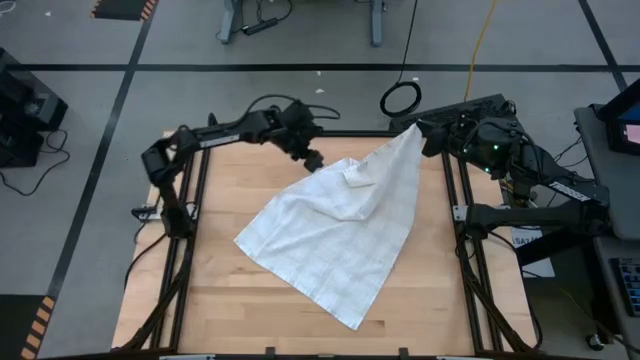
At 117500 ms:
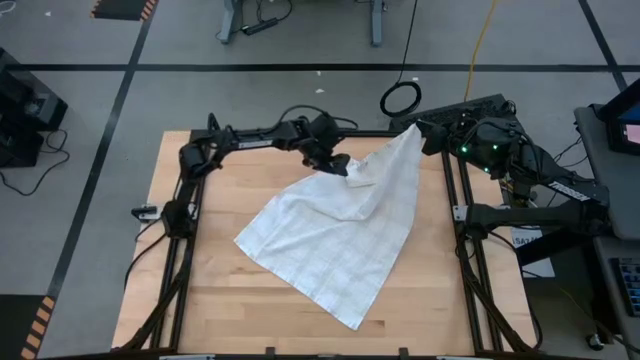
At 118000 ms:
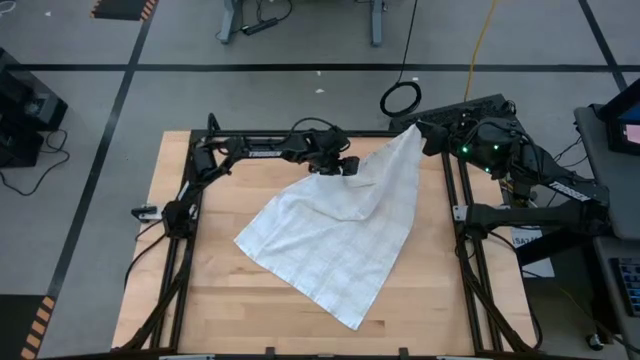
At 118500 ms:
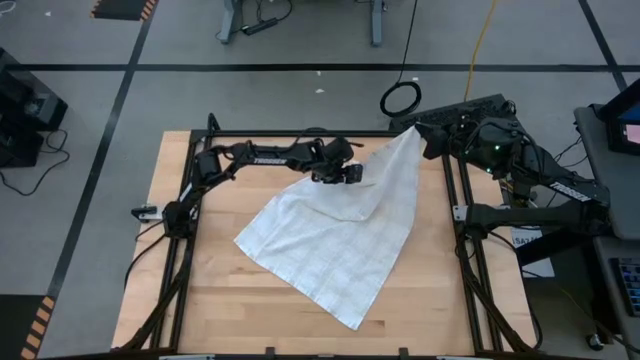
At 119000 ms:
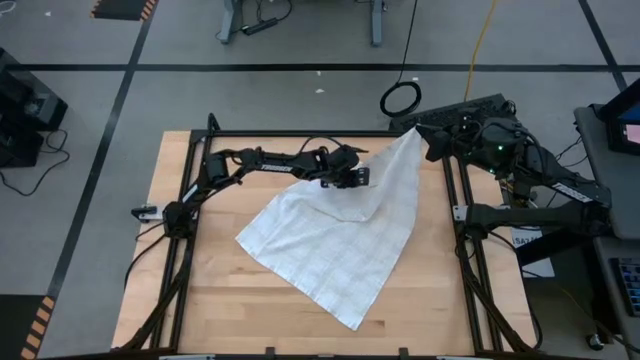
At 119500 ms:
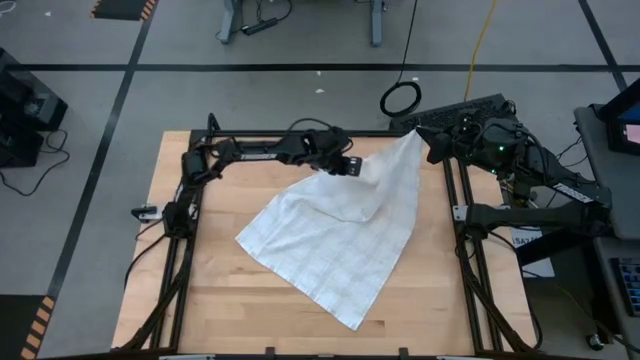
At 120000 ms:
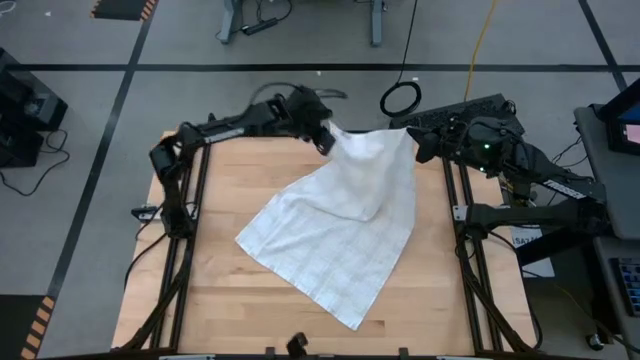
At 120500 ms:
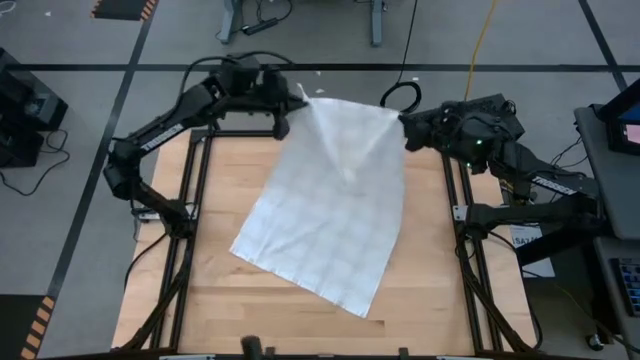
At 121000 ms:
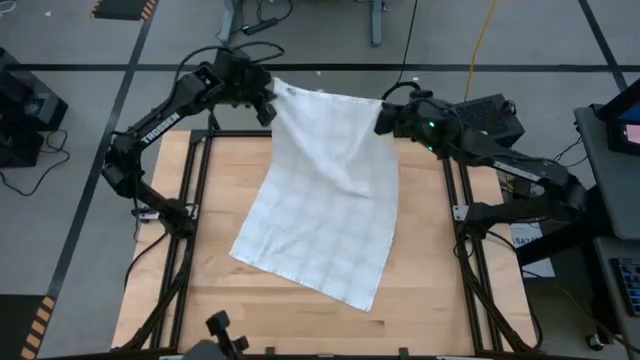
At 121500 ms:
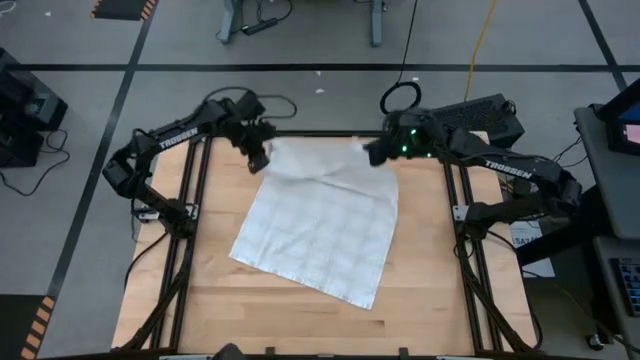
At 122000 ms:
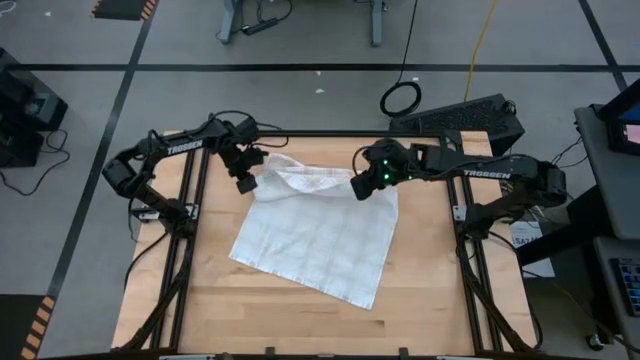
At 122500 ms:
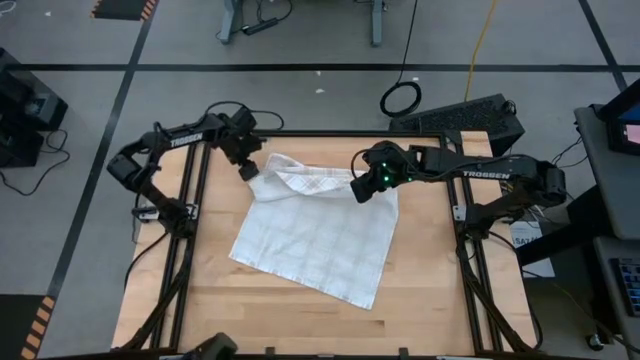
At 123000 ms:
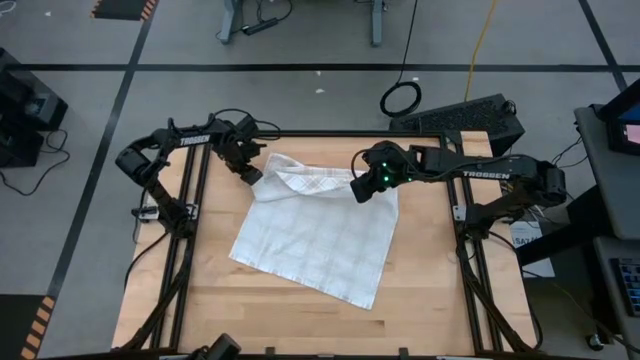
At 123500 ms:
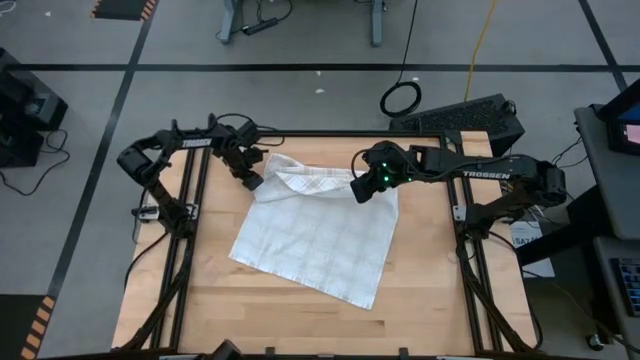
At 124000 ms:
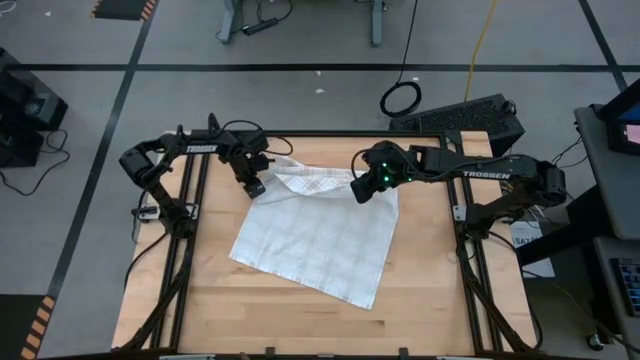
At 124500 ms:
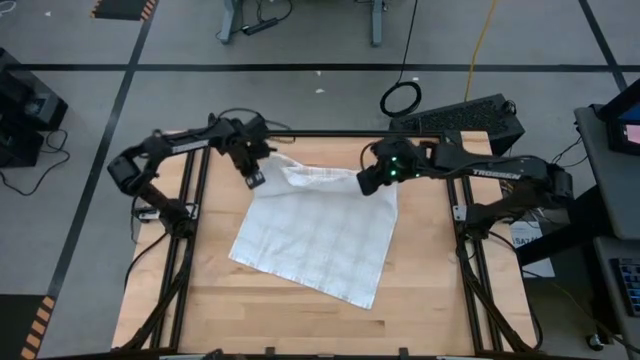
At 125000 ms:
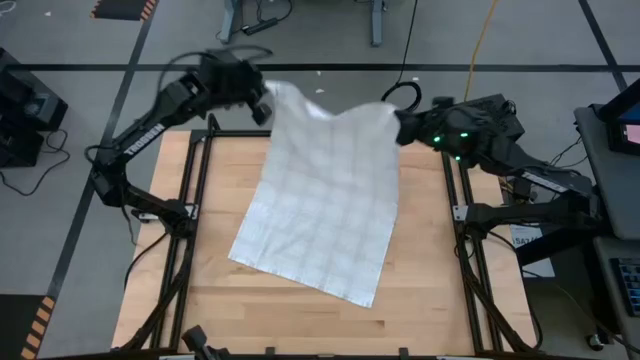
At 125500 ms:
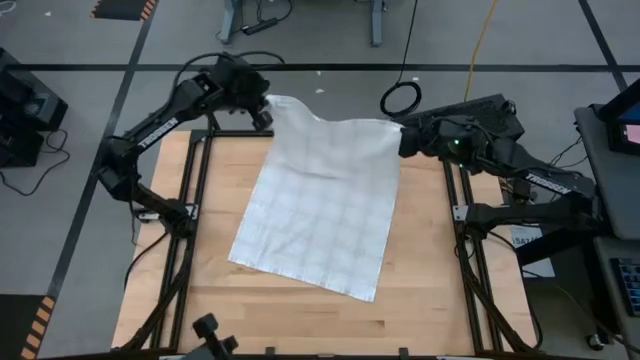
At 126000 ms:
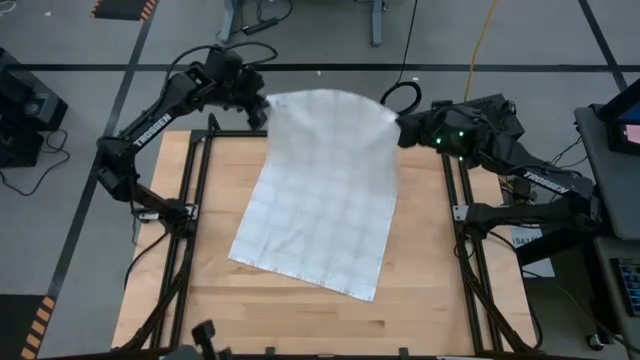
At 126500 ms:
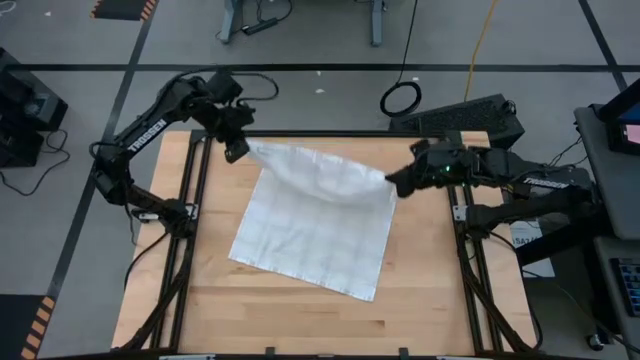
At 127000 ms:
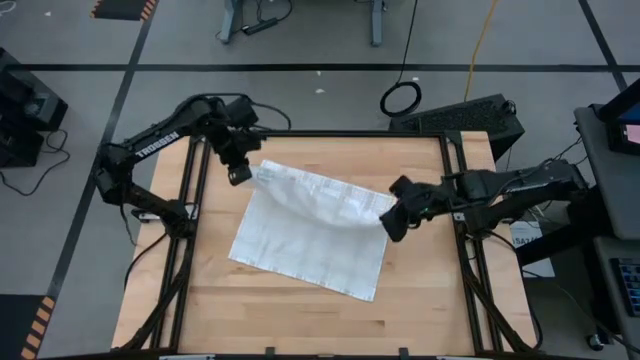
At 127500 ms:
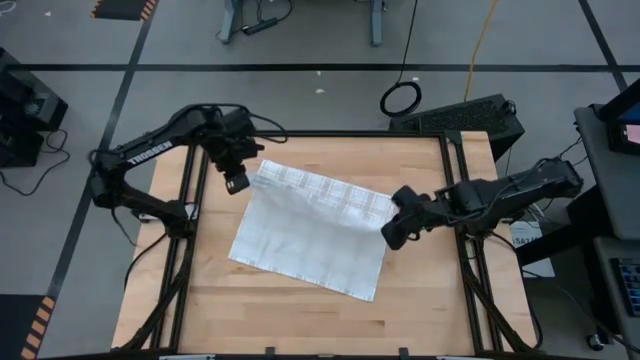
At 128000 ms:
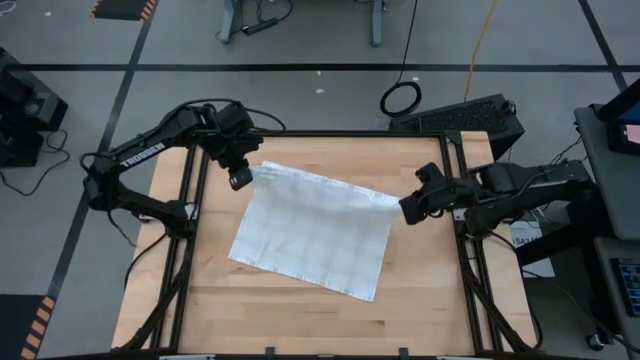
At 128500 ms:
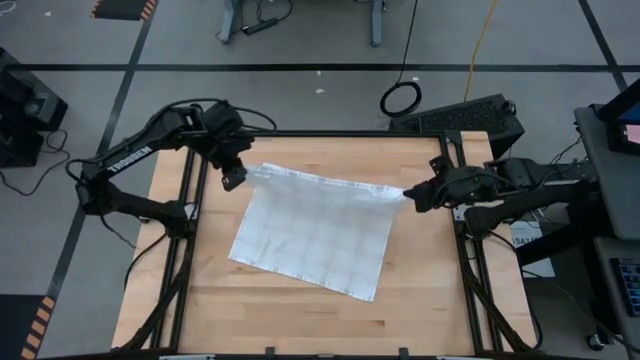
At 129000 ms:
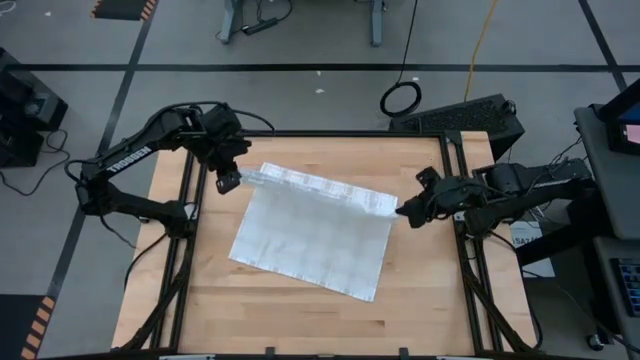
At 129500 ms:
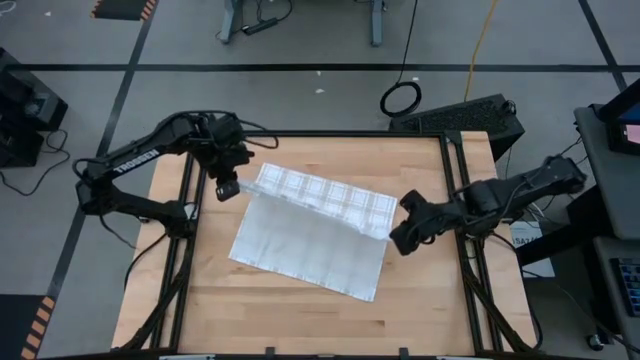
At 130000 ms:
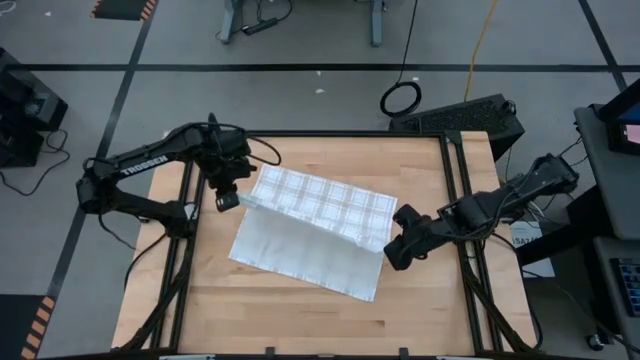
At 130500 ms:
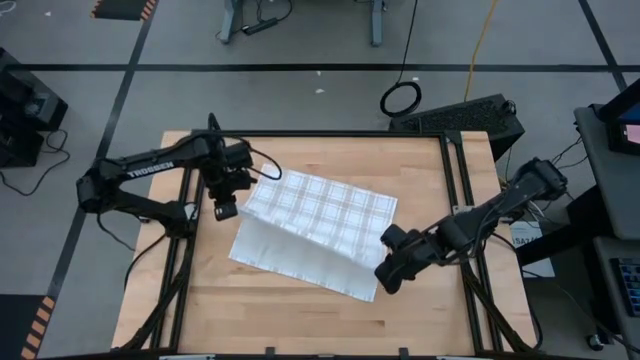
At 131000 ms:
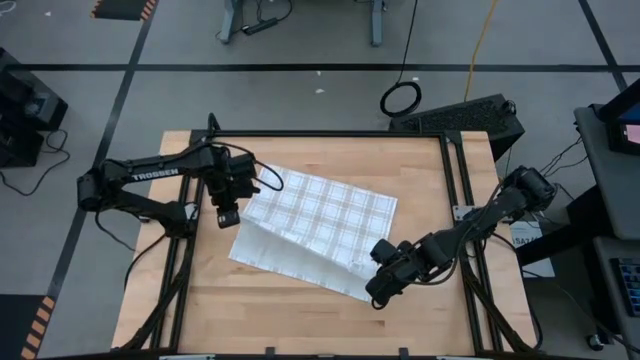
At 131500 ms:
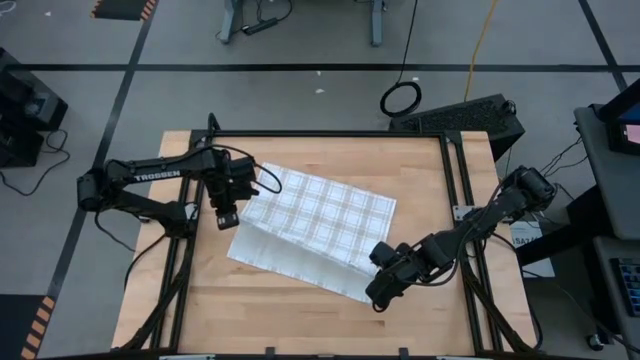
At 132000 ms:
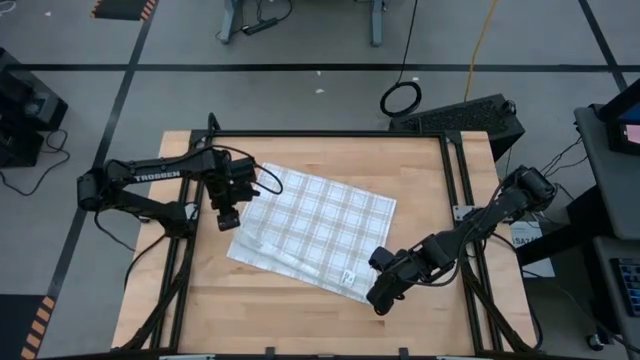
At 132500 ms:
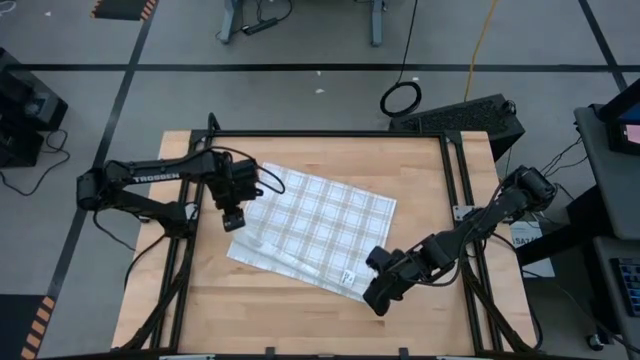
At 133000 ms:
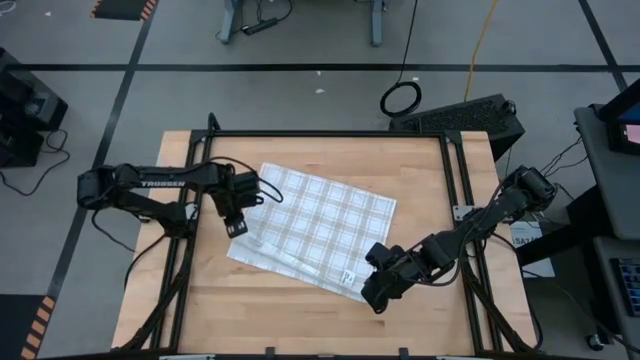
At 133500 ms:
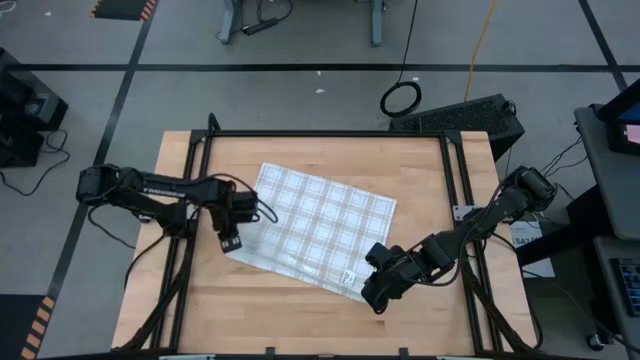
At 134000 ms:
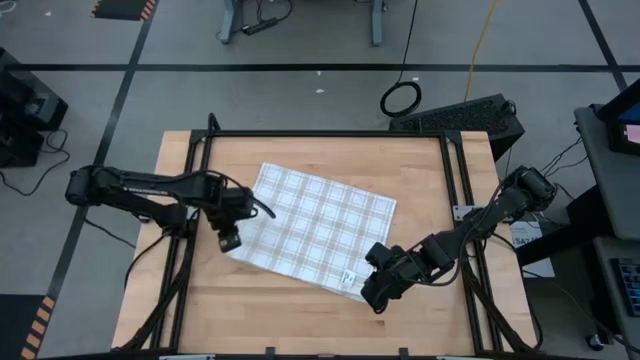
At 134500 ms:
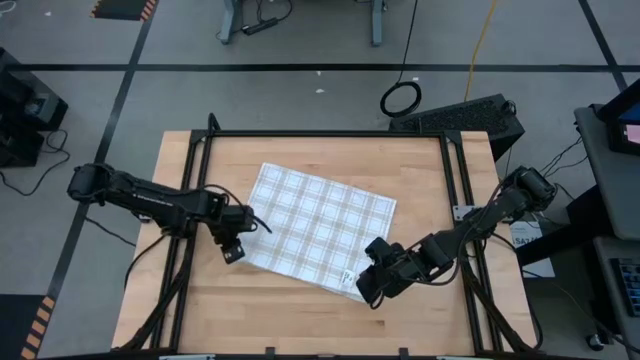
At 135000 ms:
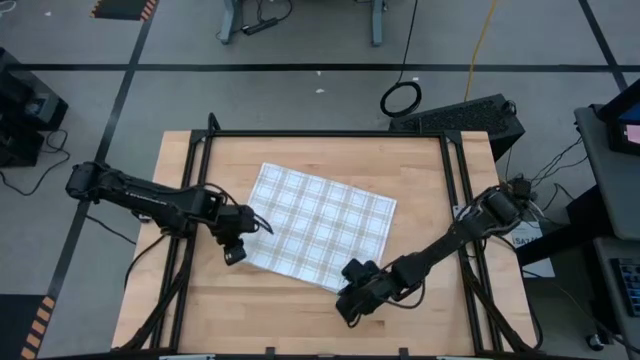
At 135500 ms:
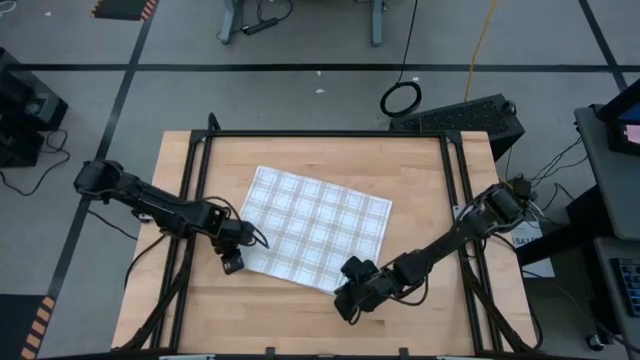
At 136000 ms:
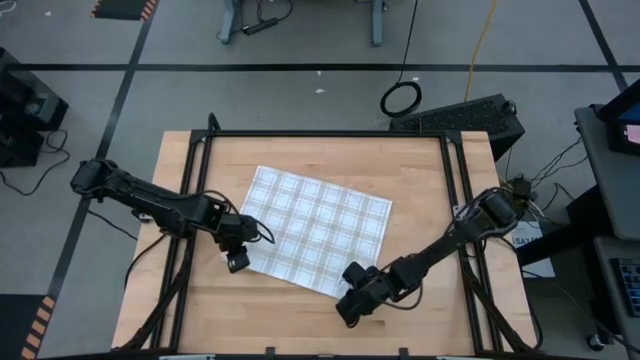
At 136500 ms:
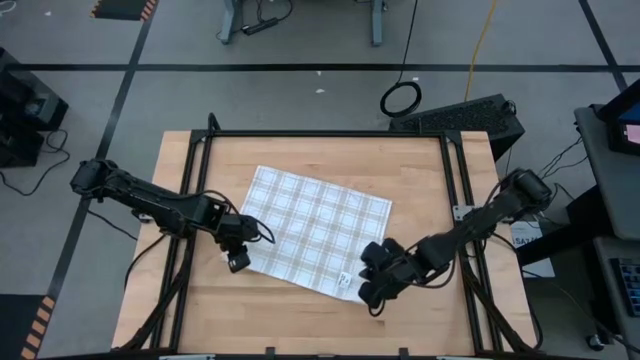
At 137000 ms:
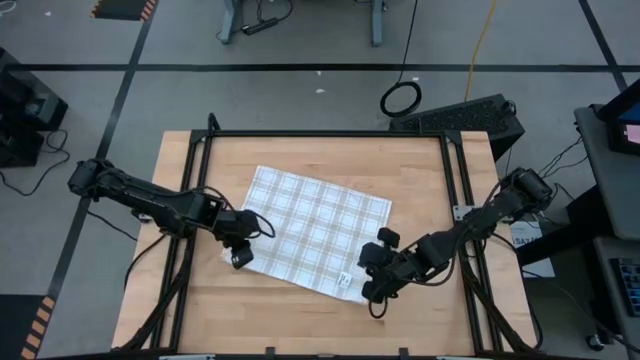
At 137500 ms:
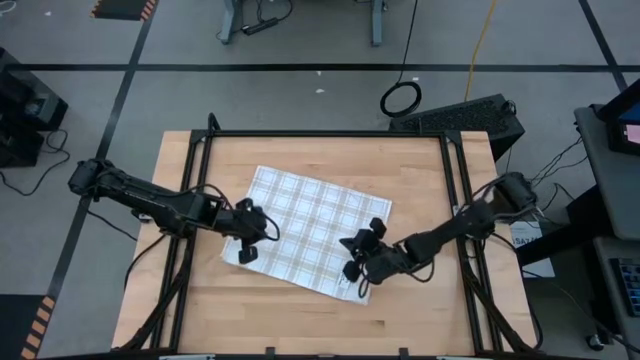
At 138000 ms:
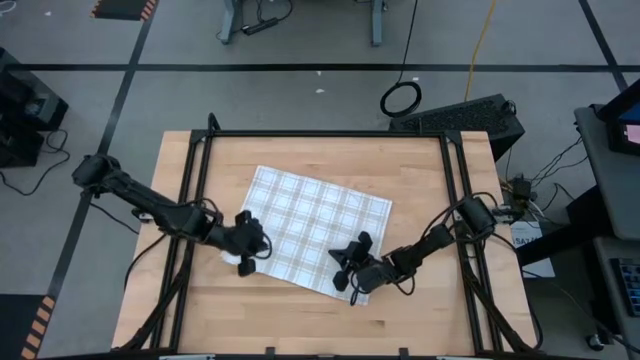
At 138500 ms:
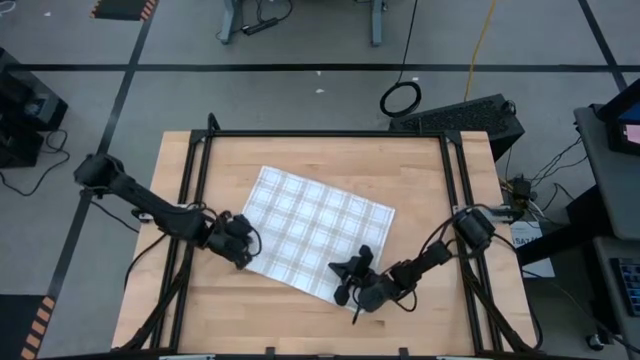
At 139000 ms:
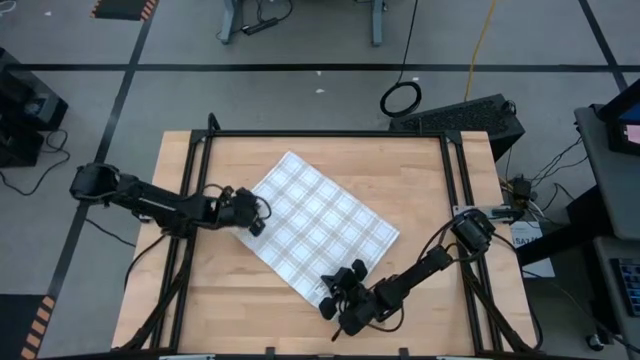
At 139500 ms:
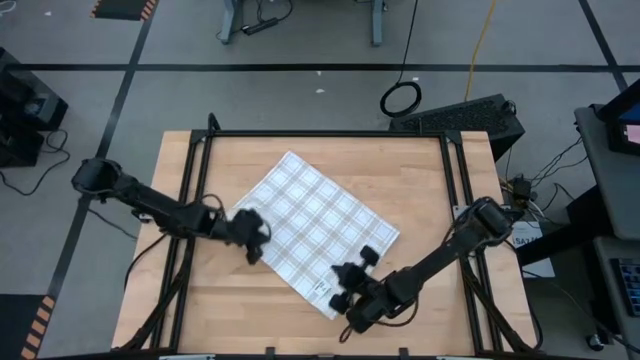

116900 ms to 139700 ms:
Task: Roll towel
Roll the towel
